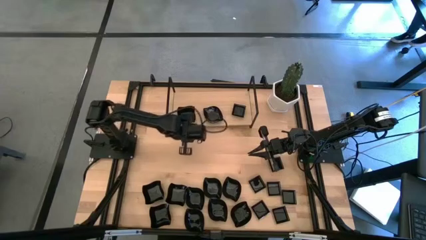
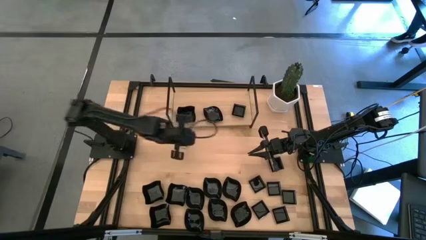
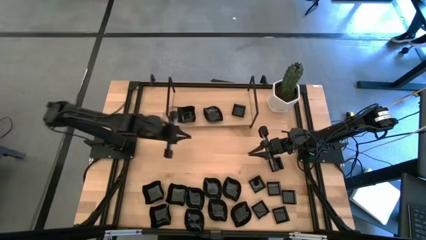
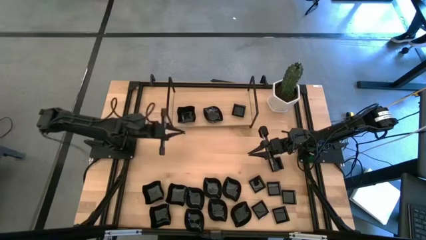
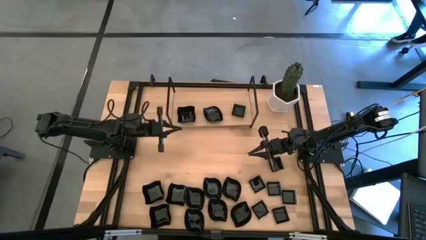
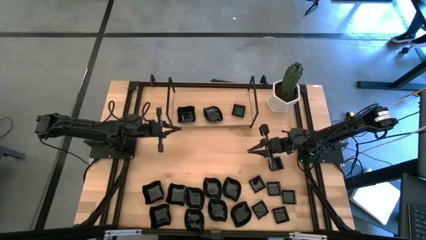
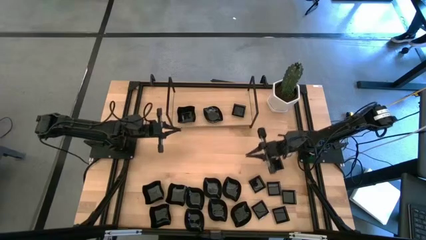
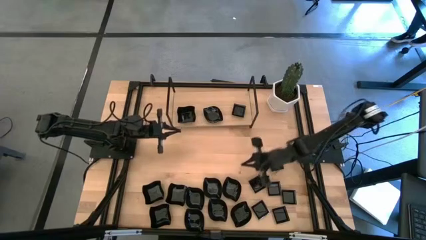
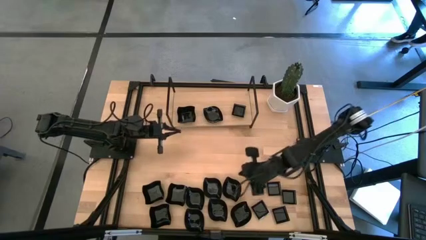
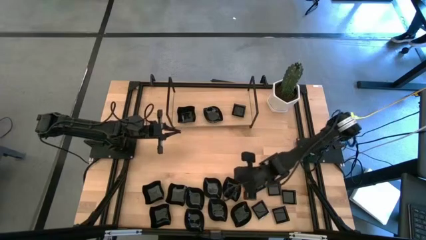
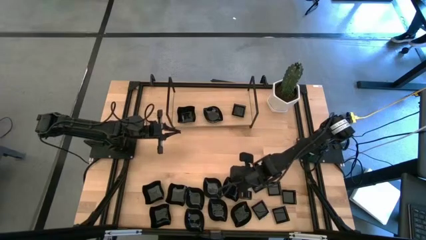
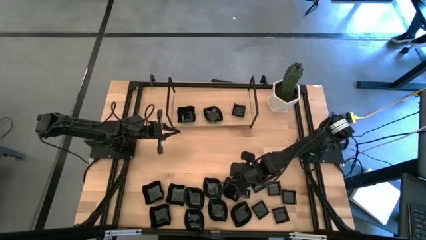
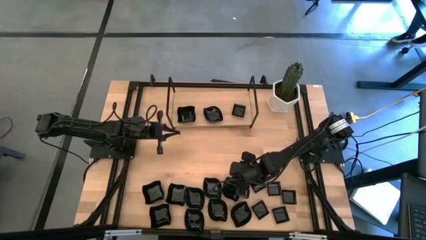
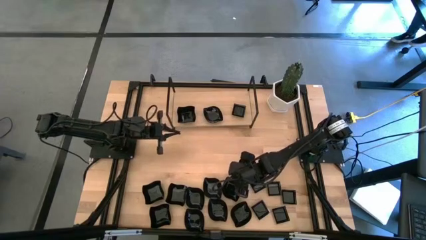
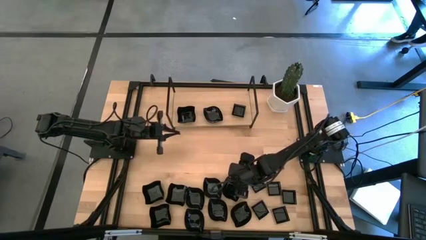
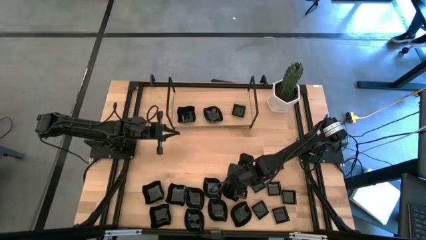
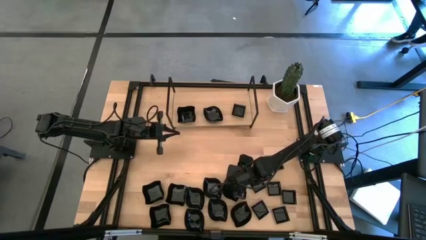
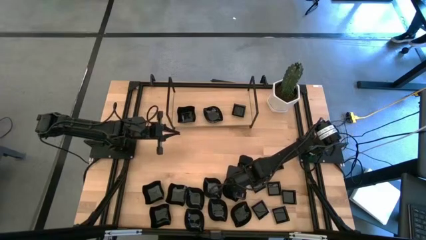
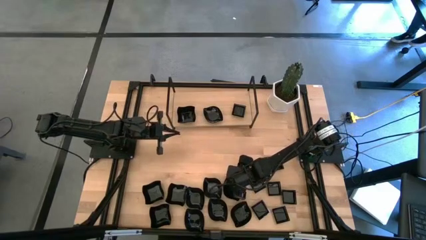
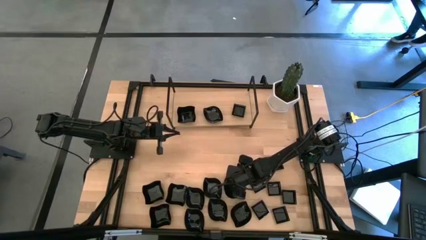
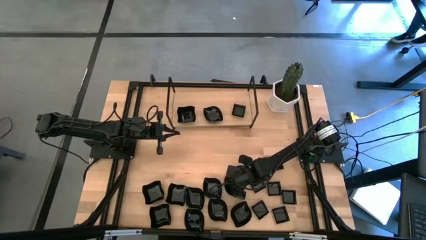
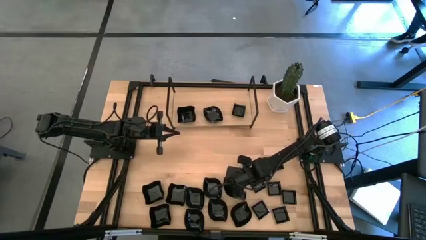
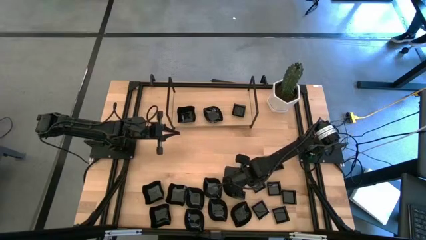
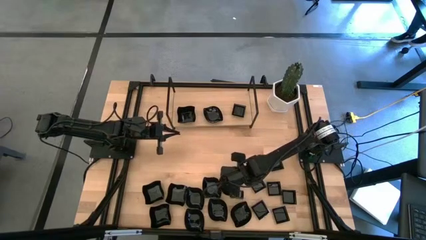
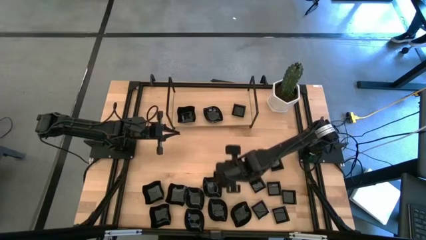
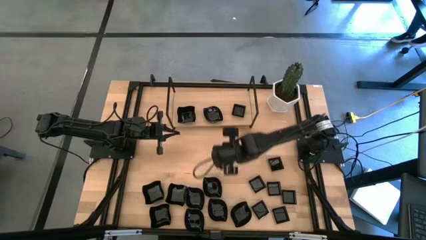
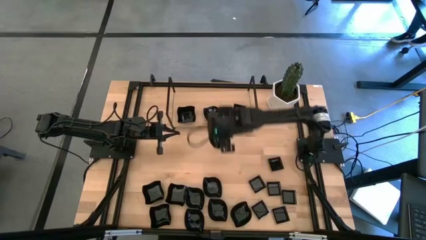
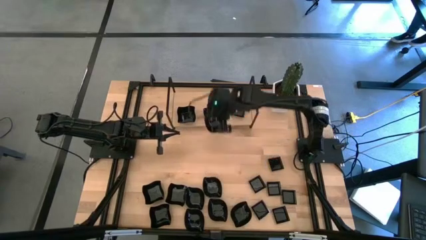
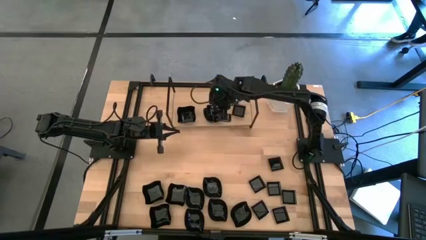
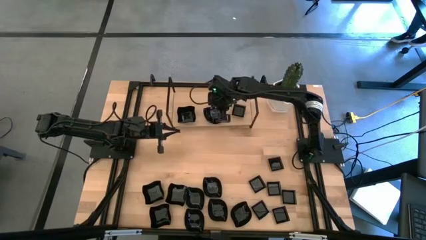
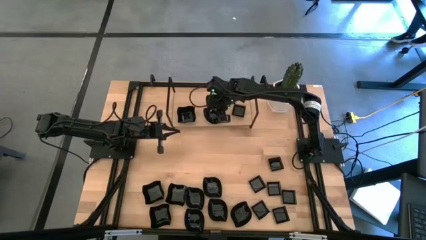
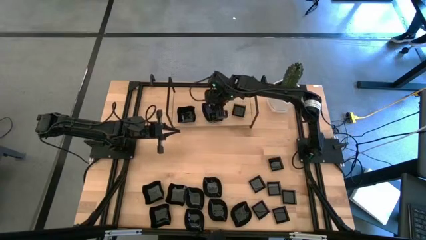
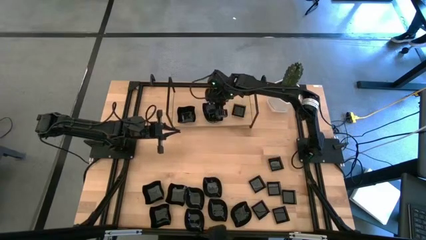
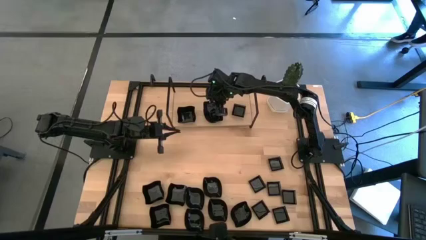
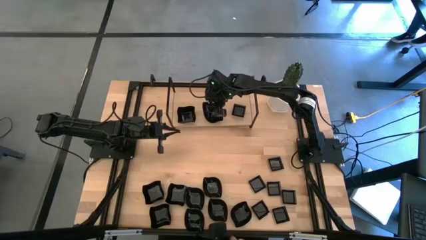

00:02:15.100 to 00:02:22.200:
Task: Pick & Place Mini shaped plates
Stack the black leaf-shaped plate on top of the black leaf-shaped plate on the shelf

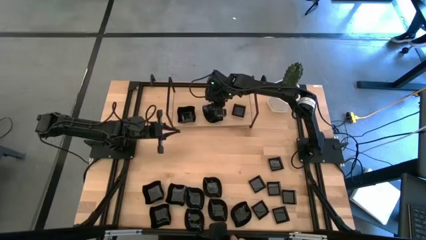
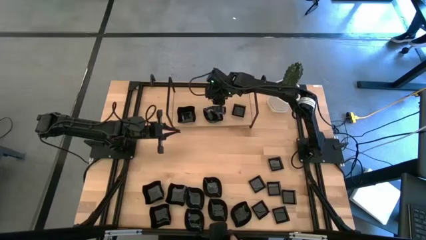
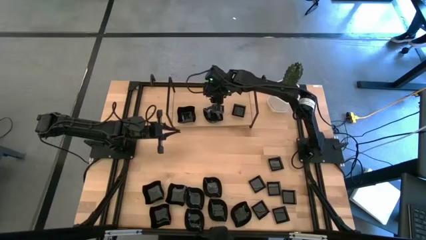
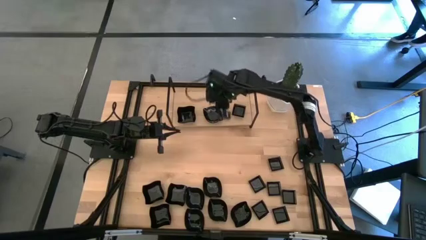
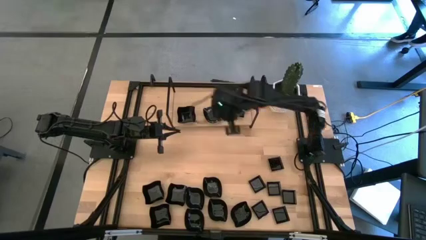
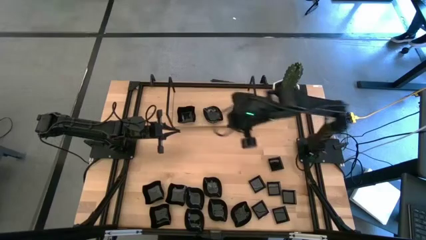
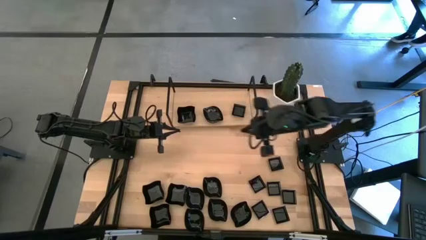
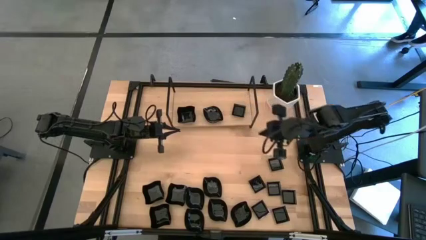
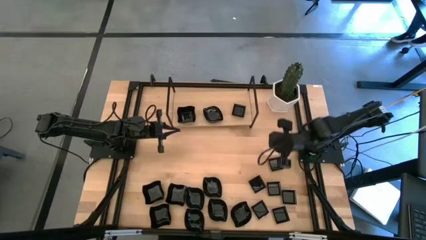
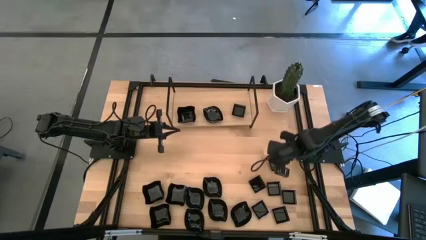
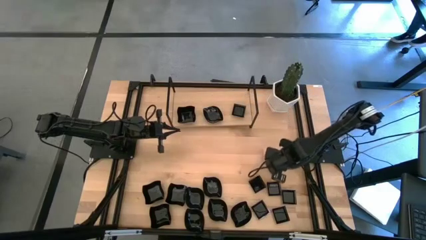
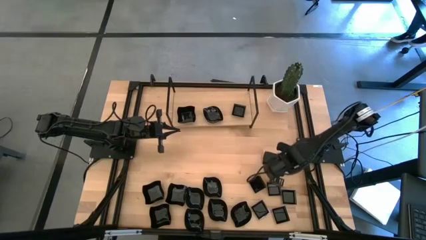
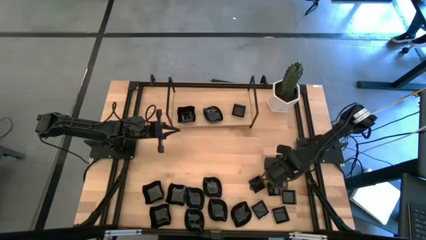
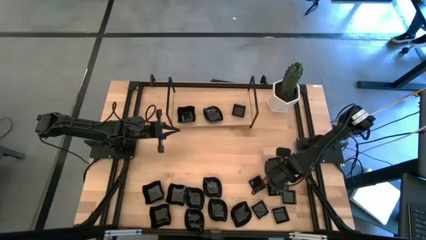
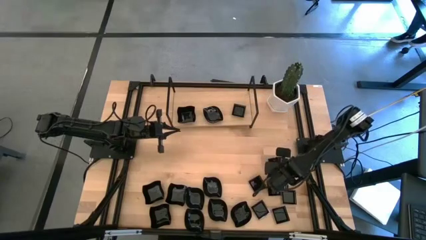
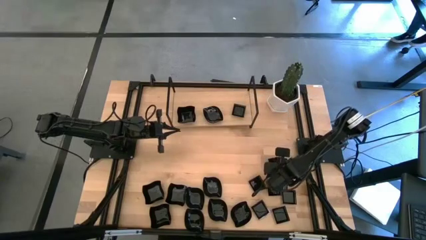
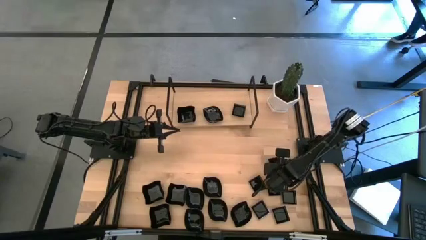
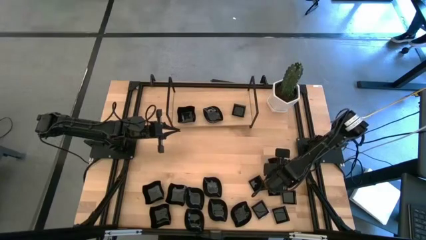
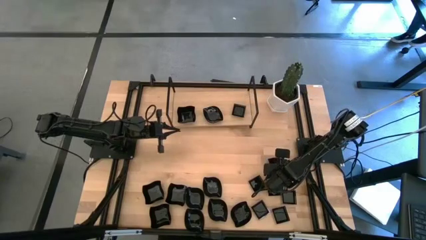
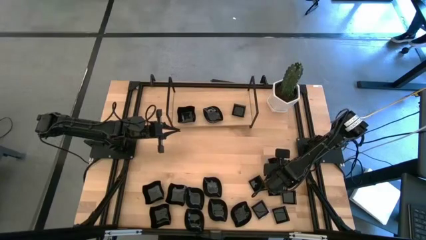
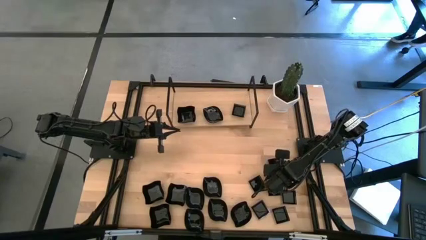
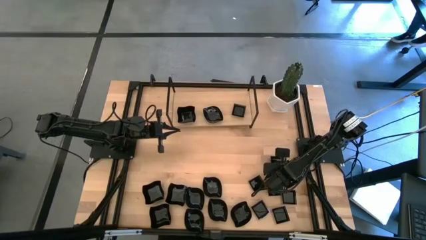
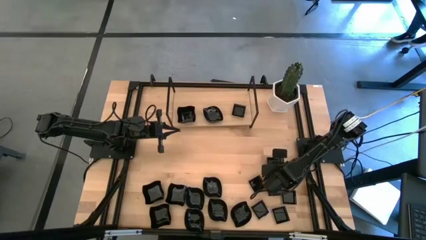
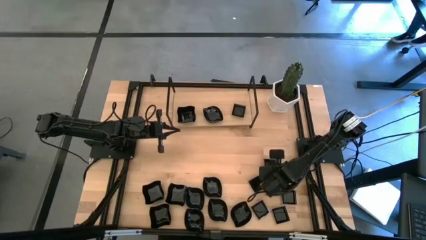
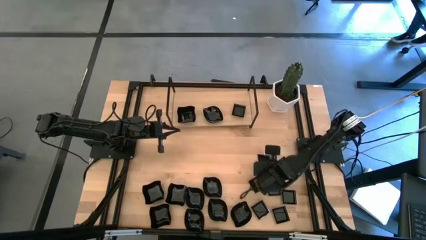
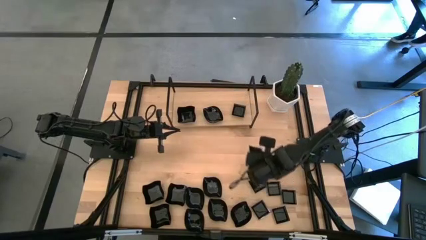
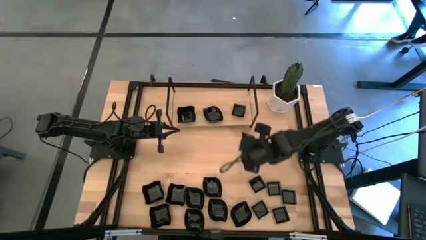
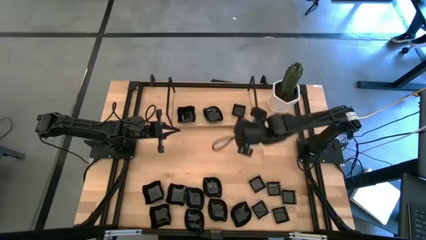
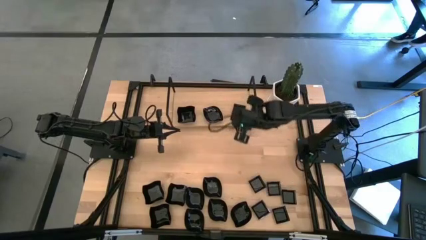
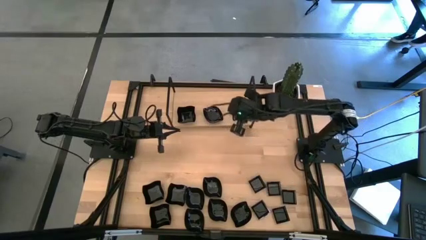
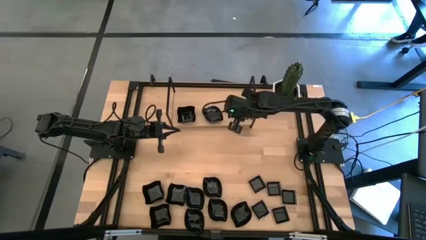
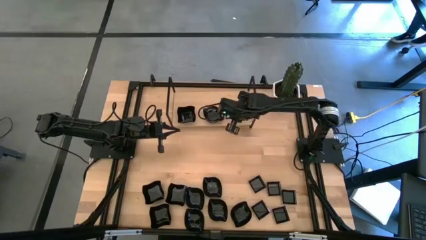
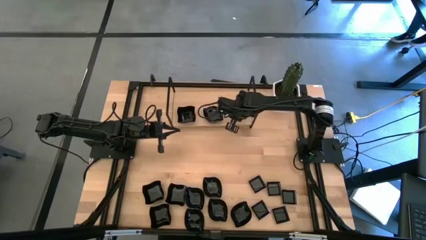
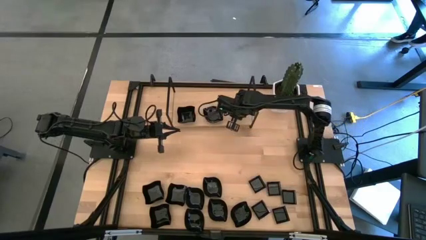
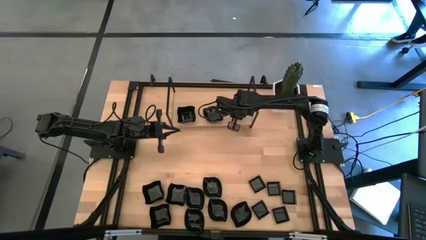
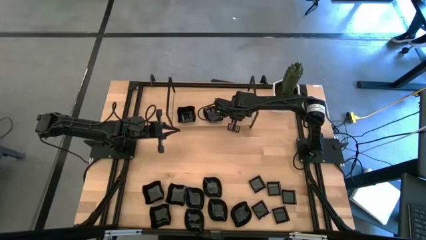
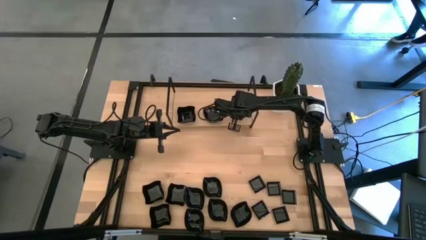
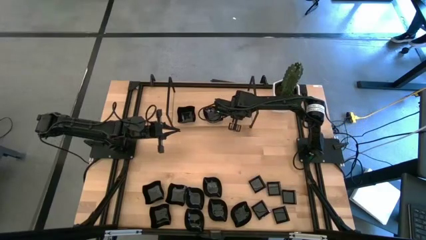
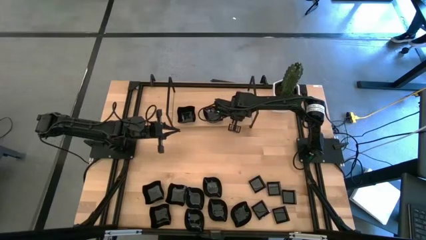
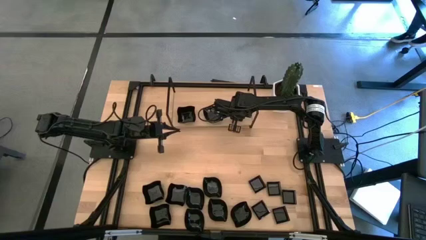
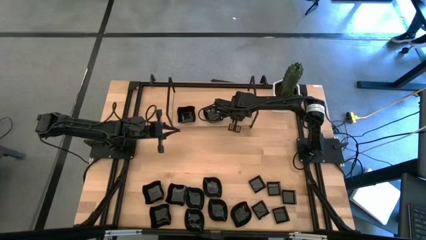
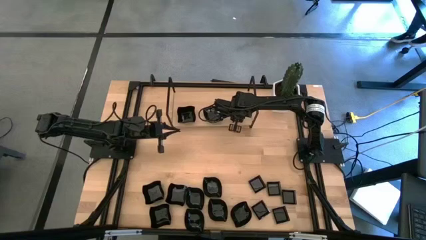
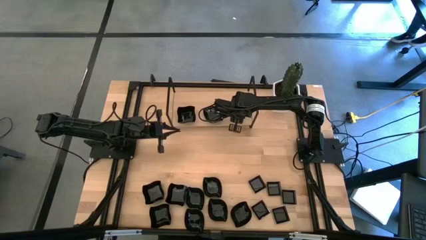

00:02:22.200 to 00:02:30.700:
Stack the black square plate on top of the black square plate on the shelf

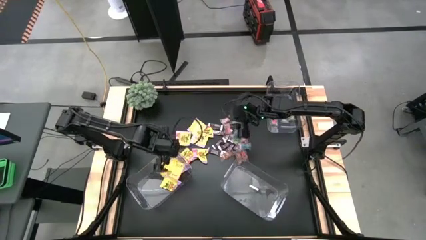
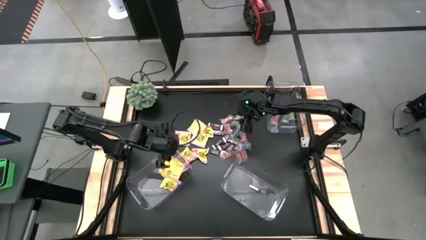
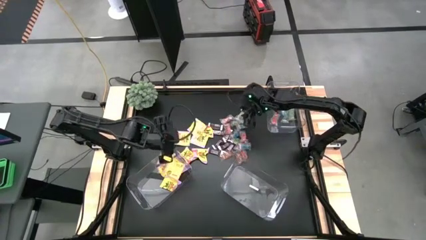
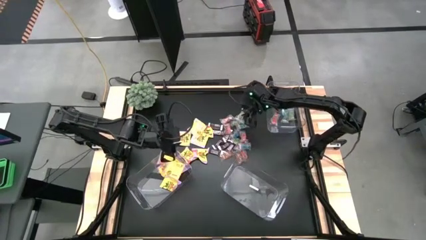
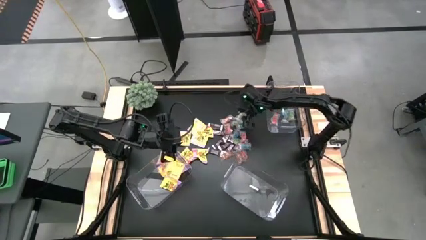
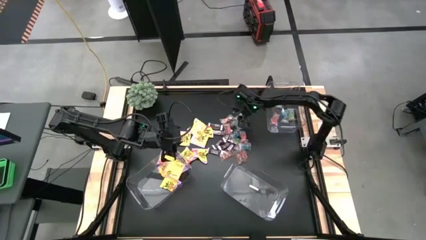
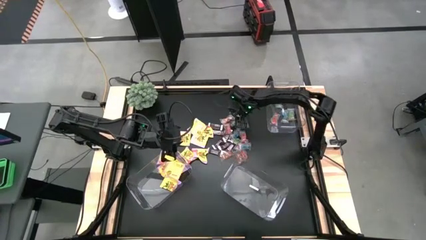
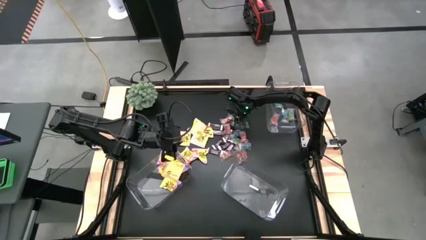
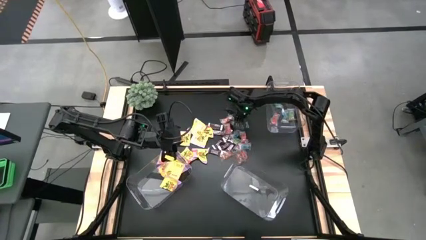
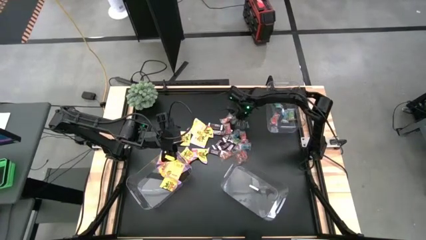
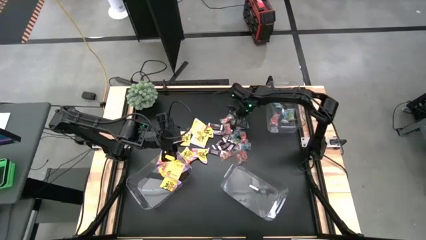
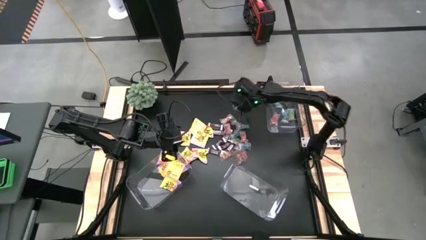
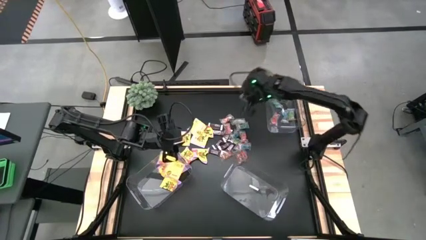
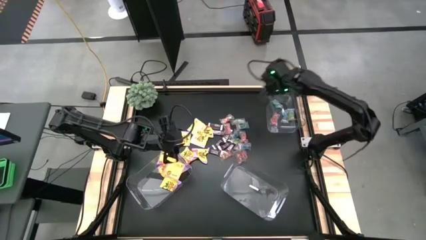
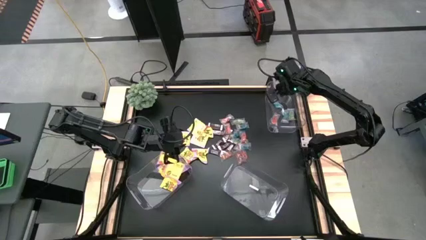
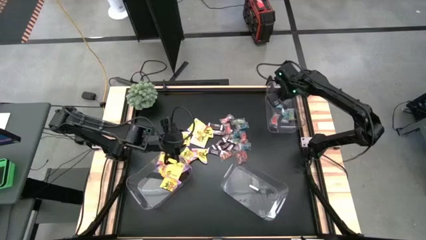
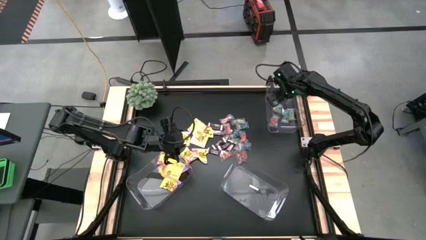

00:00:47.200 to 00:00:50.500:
Task: Sort candy
Put the green candy in the top right transparent container
